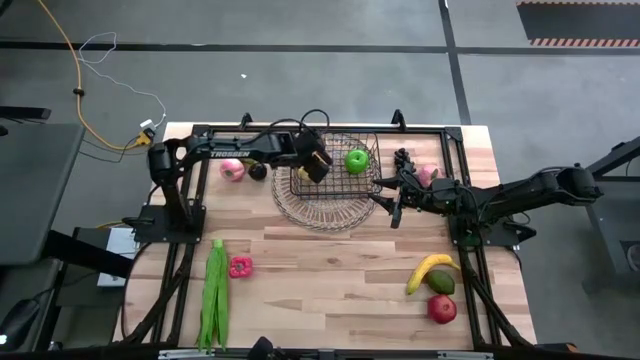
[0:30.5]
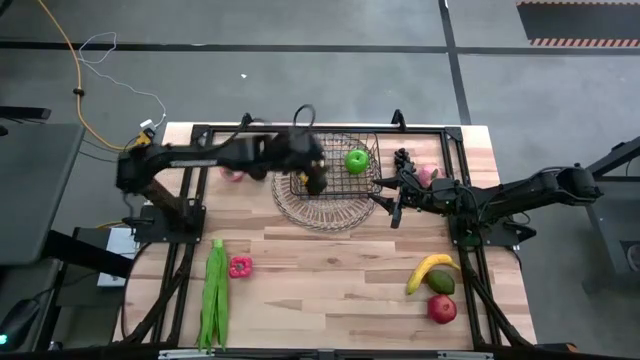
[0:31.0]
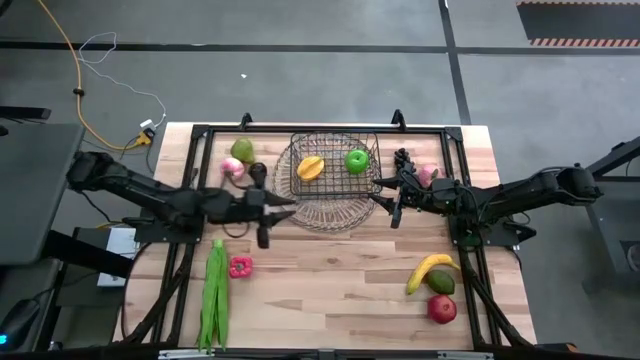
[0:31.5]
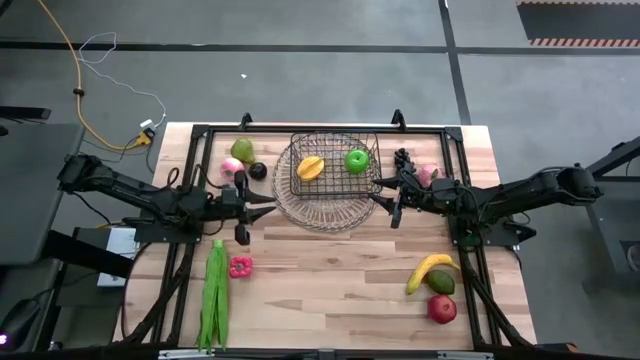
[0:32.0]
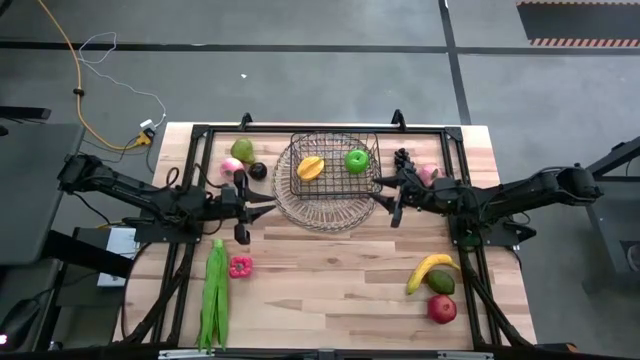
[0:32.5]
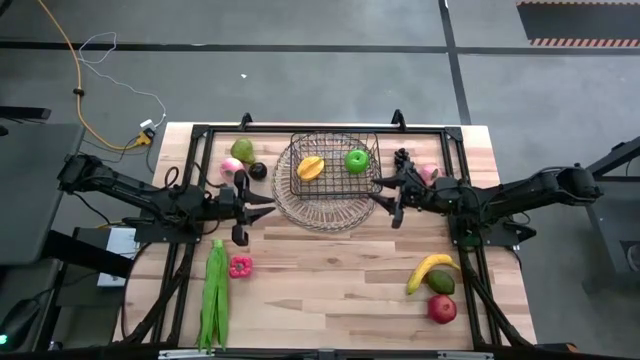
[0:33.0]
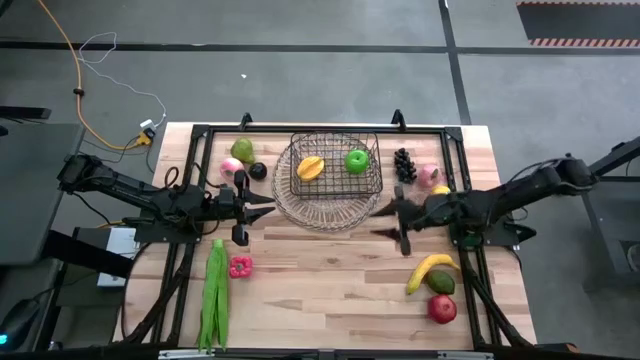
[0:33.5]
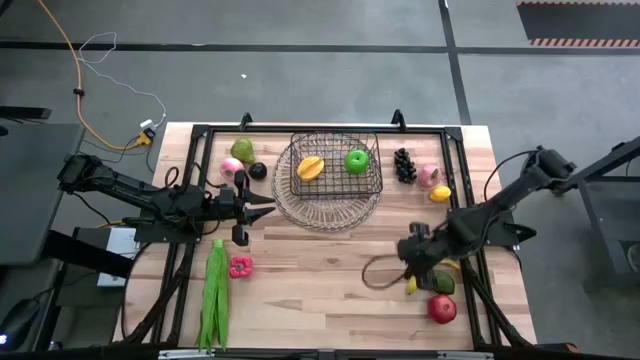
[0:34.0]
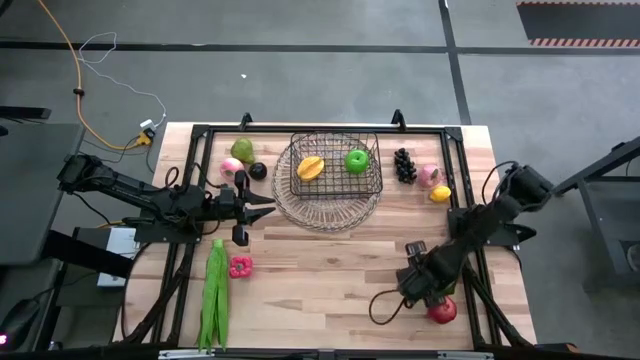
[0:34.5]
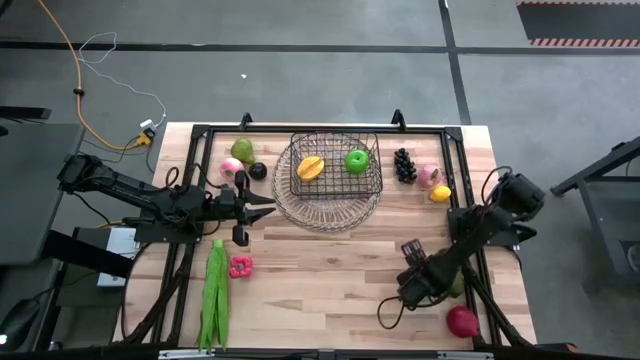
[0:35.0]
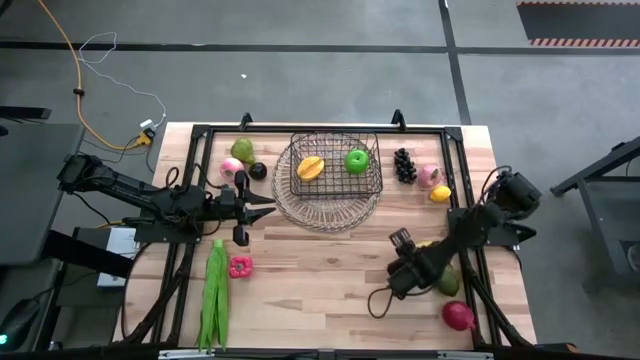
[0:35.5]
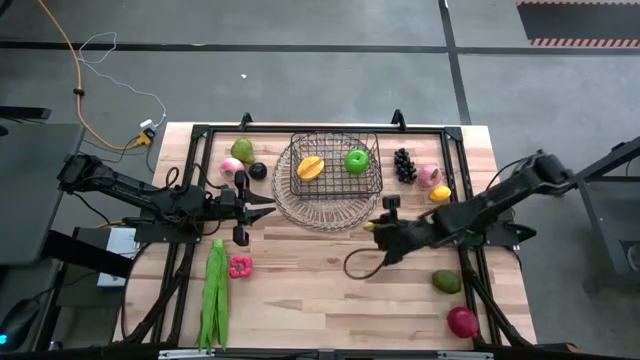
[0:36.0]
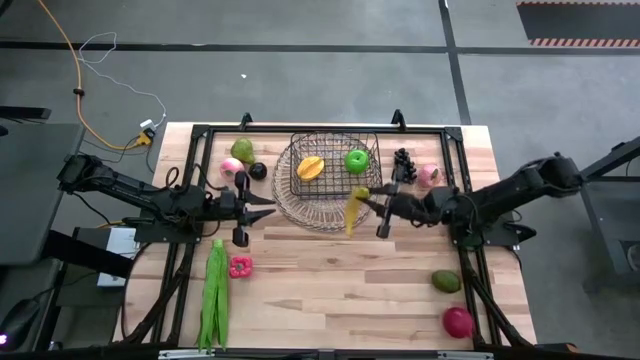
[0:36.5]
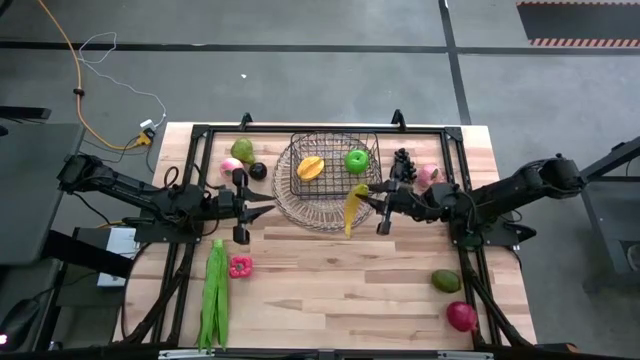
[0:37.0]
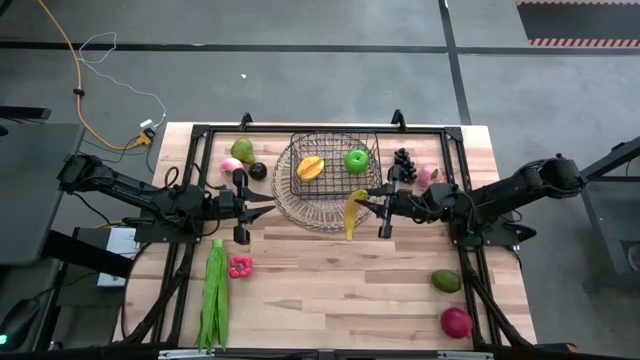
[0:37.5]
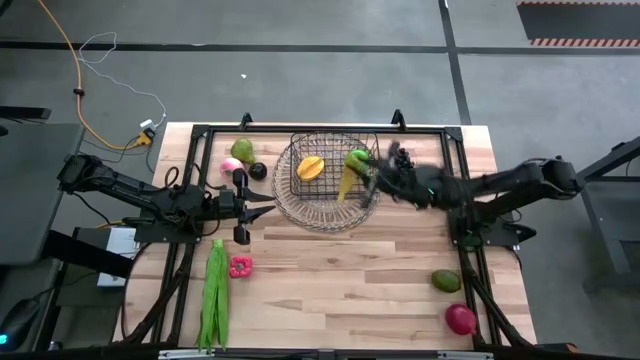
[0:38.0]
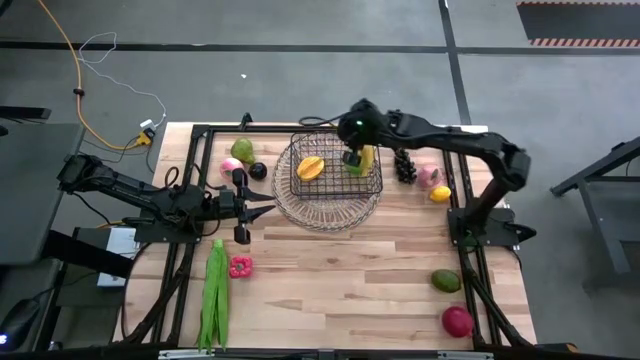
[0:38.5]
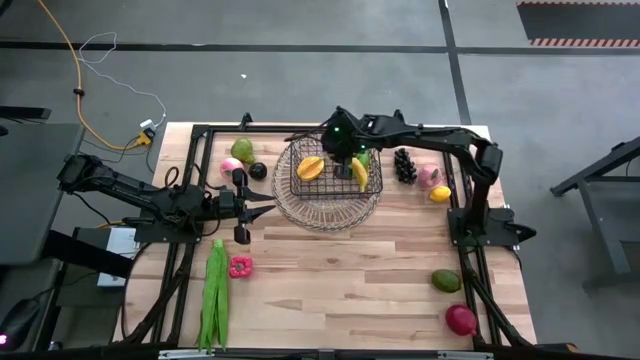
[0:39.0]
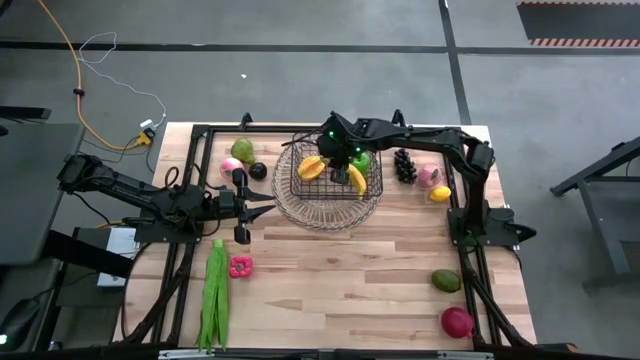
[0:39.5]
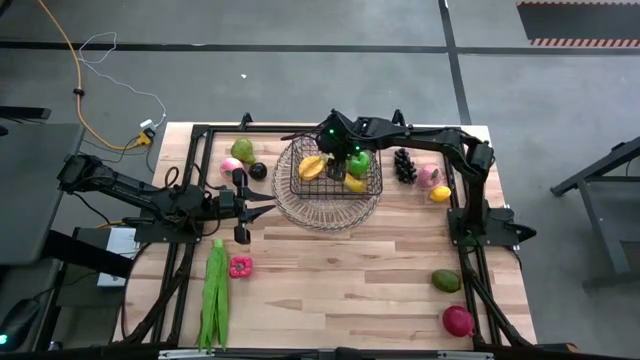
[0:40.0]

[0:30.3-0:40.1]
Task: Build produce basket
Put the banana into the wire basket

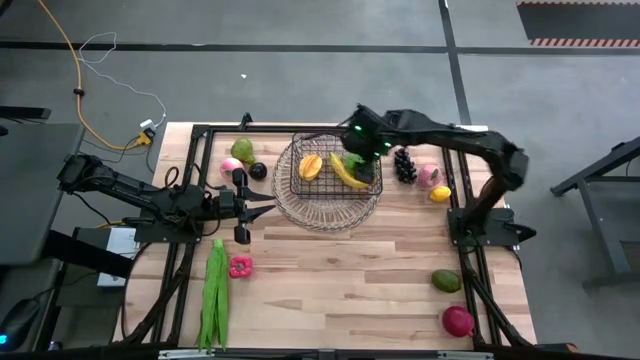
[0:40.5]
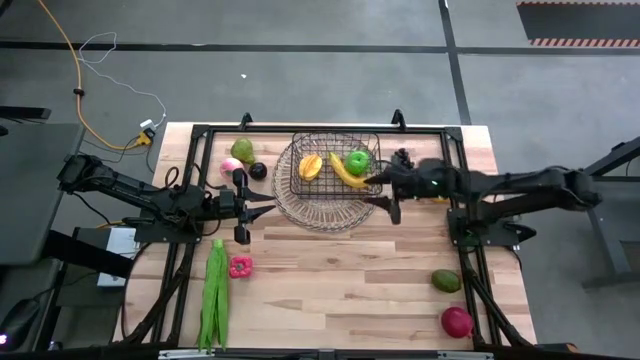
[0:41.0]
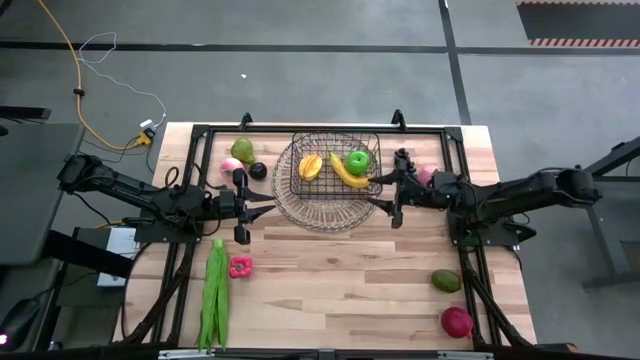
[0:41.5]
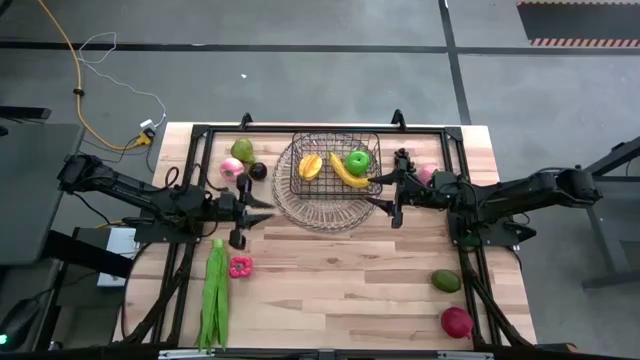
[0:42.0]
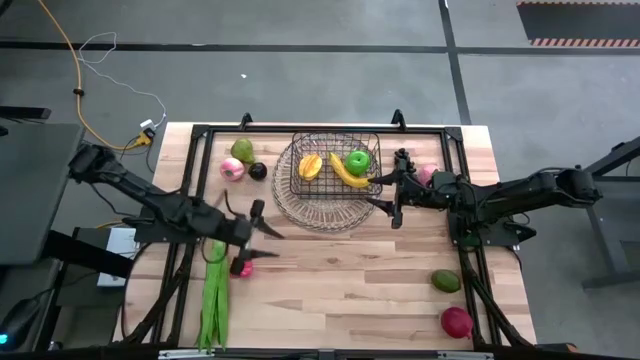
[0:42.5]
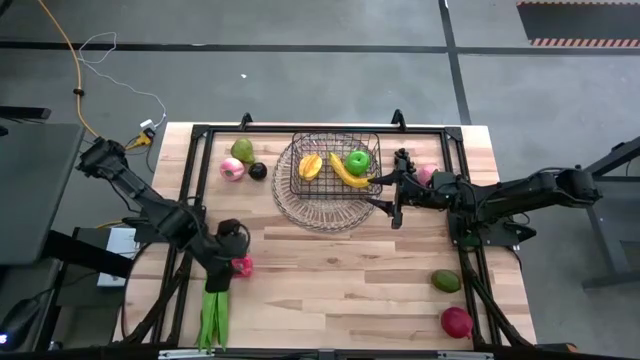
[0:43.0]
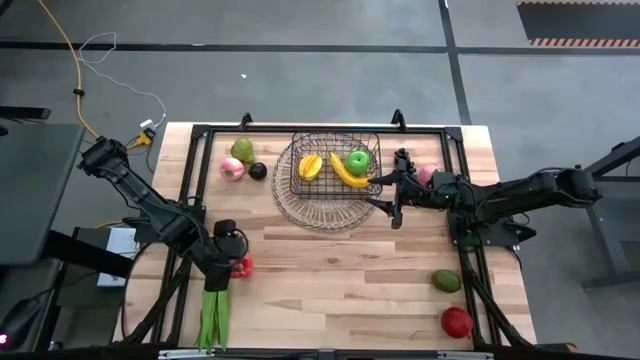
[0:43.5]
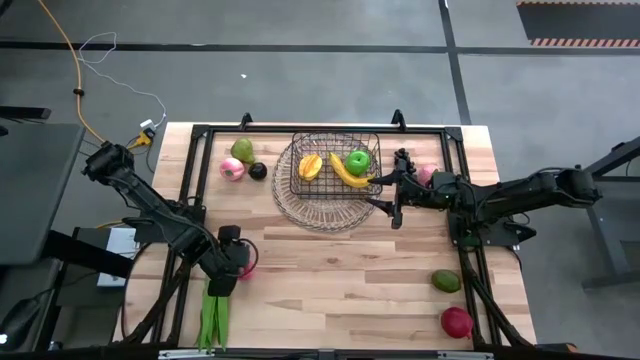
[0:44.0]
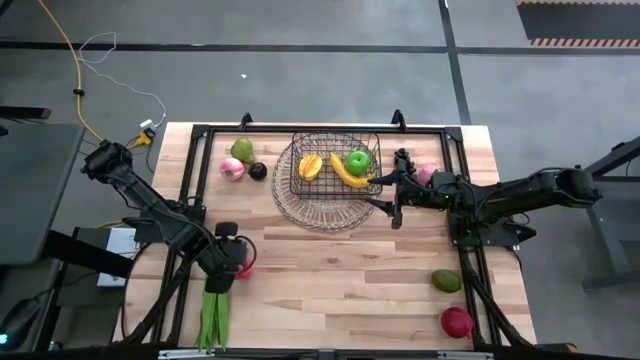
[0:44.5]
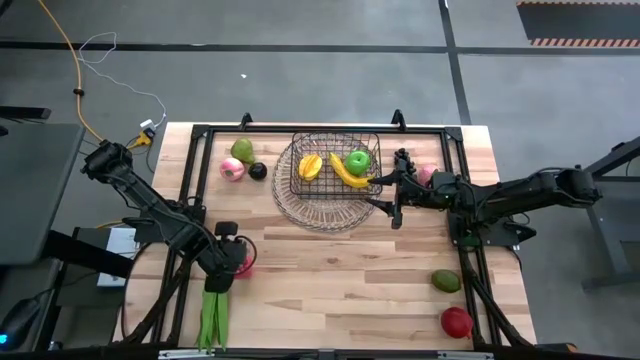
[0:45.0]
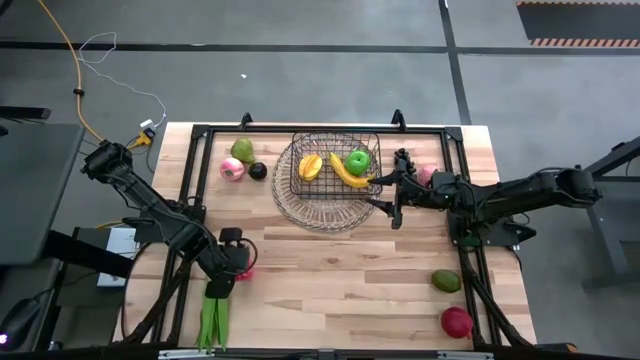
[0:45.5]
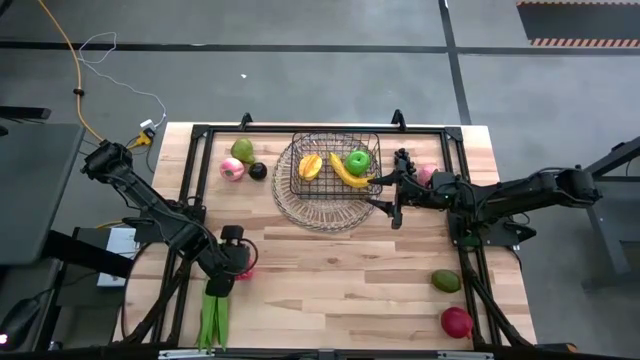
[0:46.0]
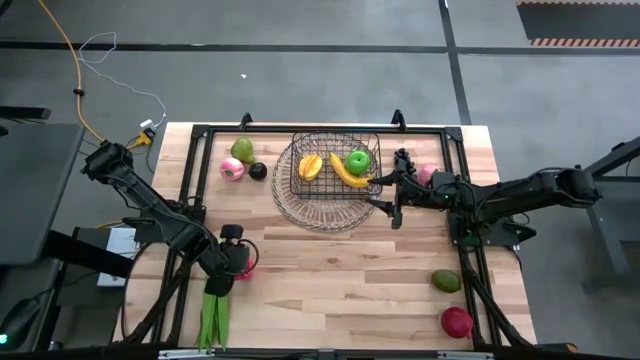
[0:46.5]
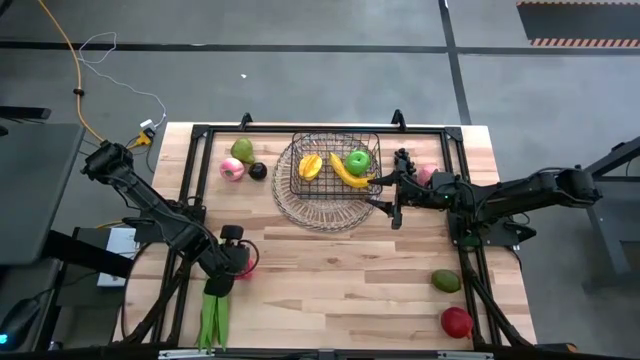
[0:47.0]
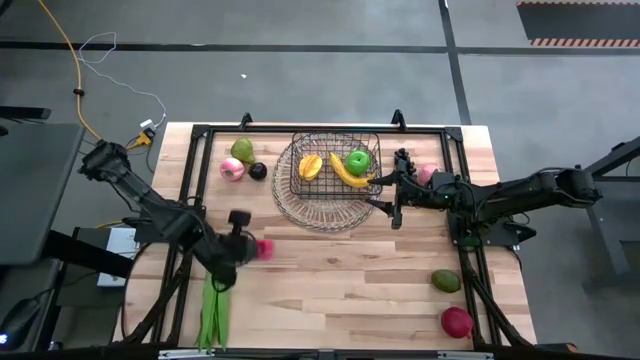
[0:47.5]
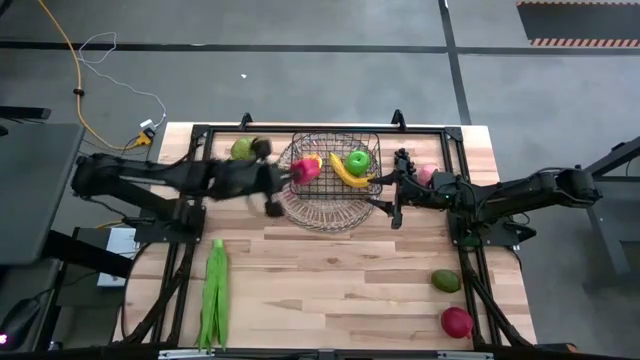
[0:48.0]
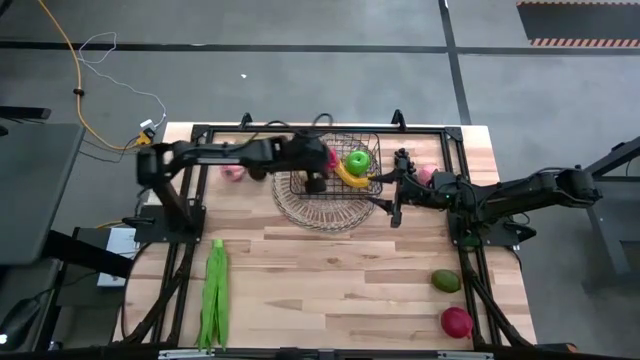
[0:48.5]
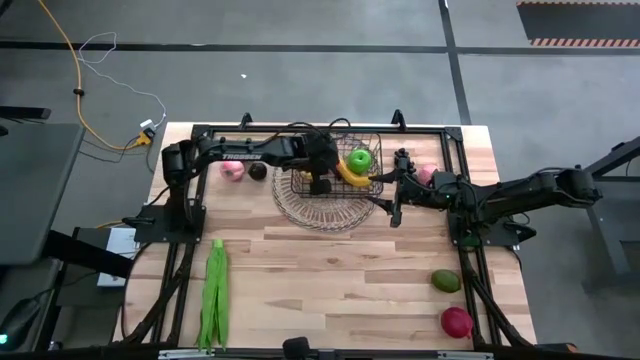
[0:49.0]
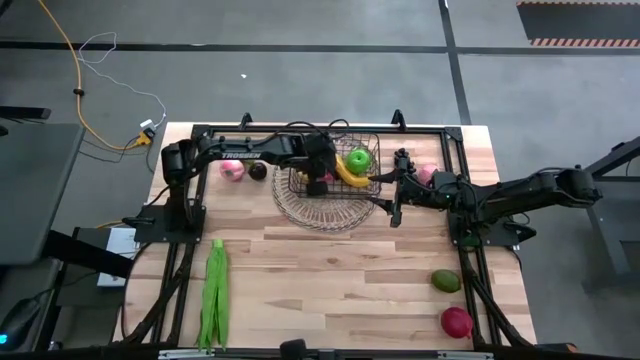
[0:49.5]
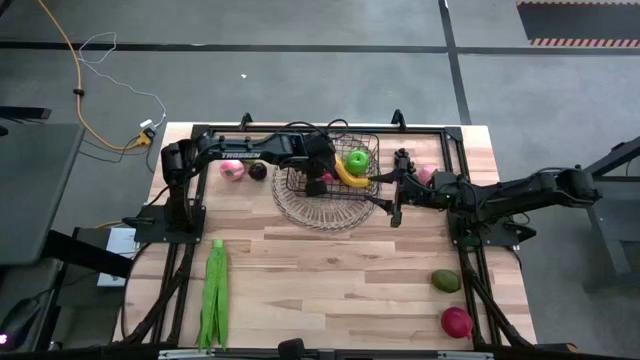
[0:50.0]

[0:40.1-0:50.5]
Put the red bell pepper into the wire basket
